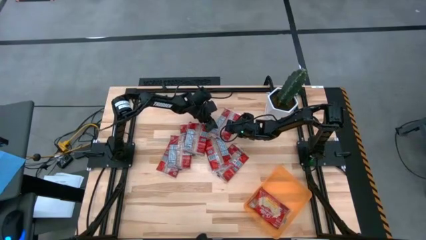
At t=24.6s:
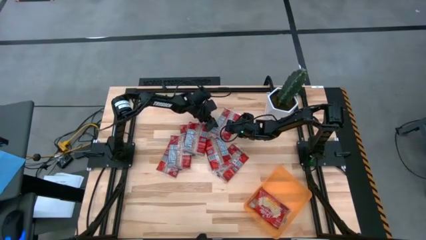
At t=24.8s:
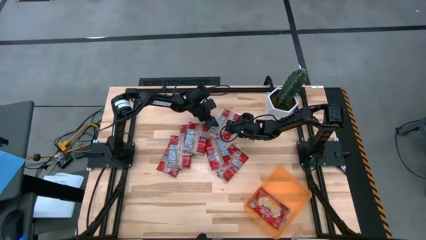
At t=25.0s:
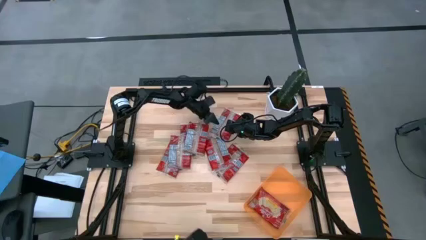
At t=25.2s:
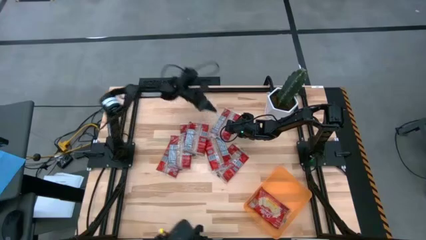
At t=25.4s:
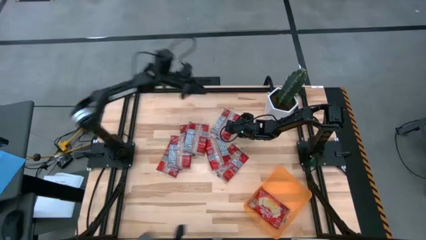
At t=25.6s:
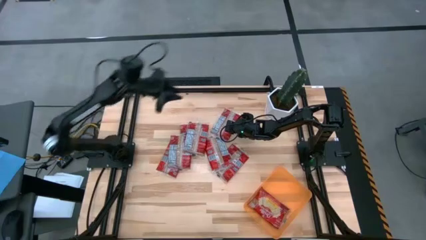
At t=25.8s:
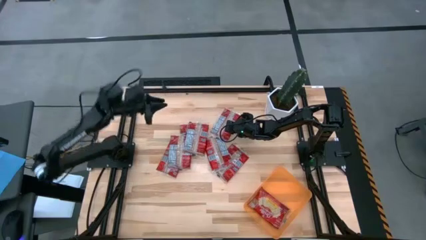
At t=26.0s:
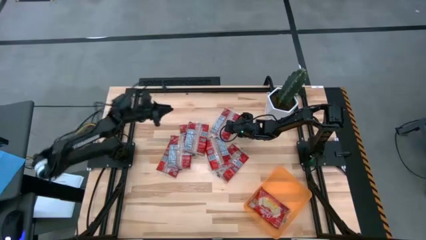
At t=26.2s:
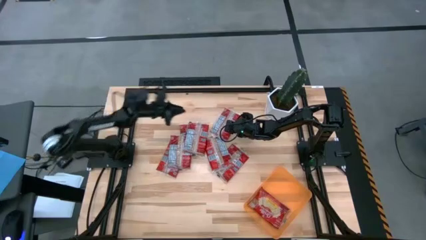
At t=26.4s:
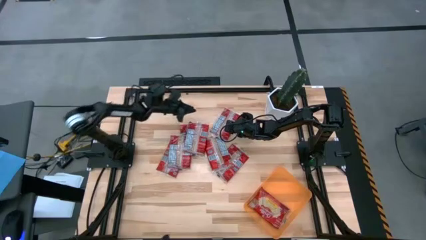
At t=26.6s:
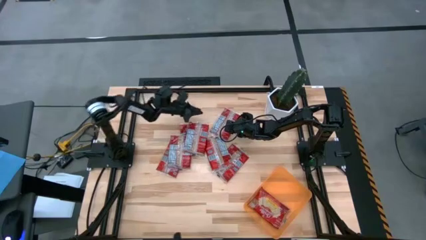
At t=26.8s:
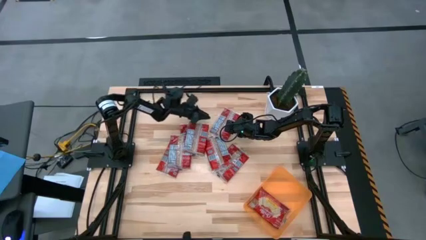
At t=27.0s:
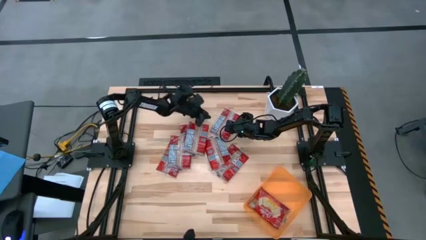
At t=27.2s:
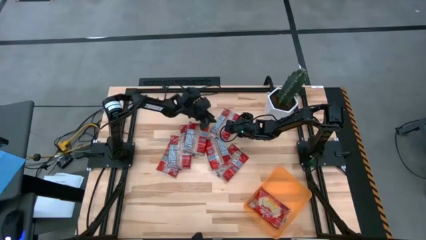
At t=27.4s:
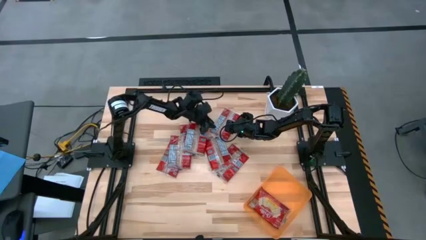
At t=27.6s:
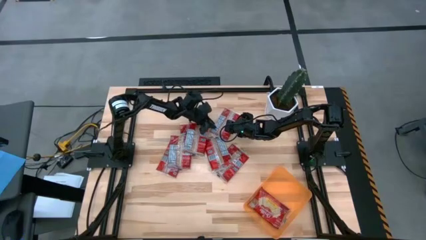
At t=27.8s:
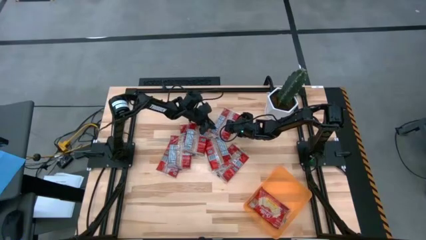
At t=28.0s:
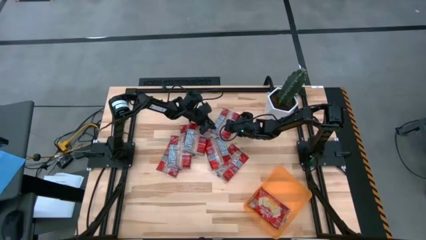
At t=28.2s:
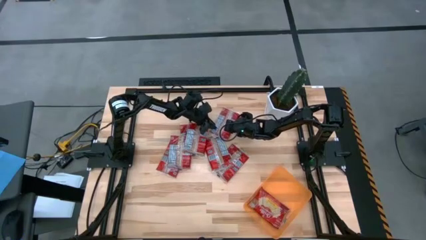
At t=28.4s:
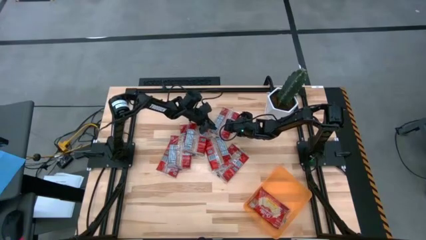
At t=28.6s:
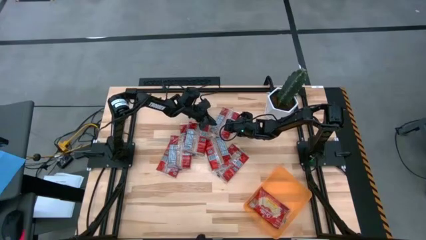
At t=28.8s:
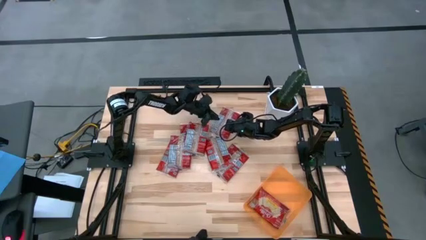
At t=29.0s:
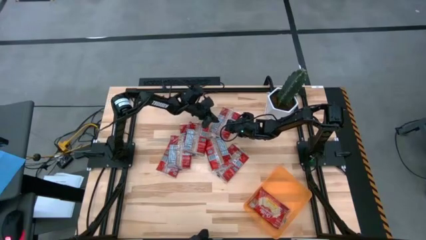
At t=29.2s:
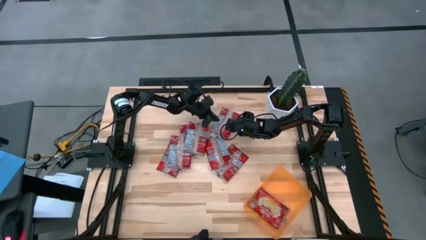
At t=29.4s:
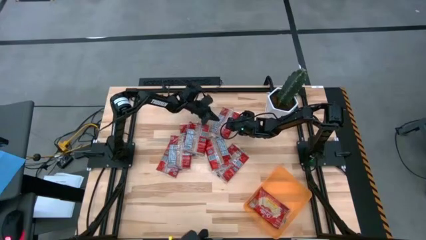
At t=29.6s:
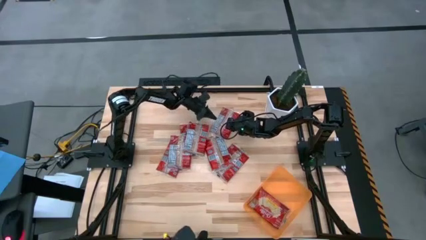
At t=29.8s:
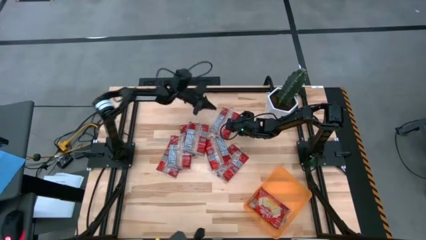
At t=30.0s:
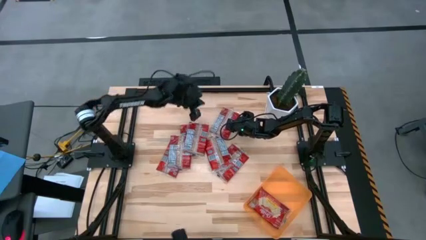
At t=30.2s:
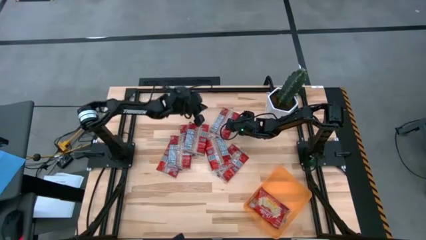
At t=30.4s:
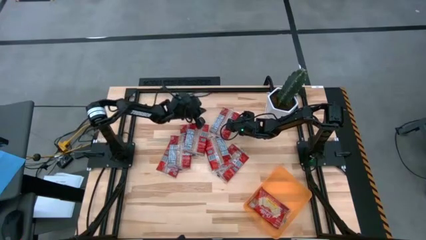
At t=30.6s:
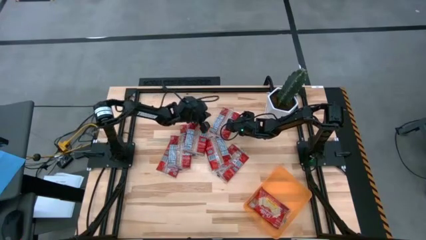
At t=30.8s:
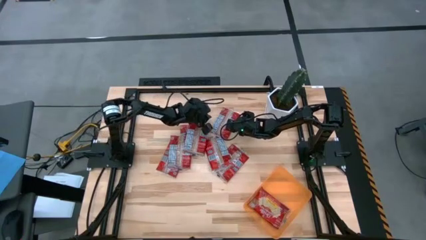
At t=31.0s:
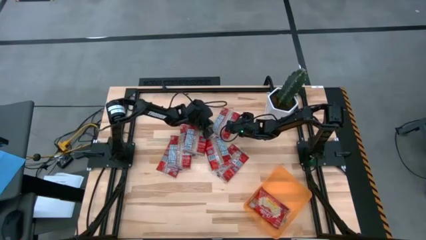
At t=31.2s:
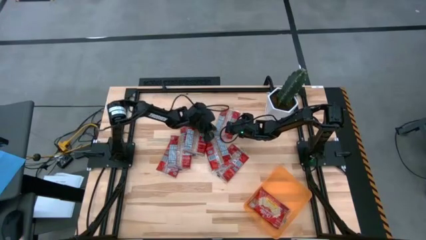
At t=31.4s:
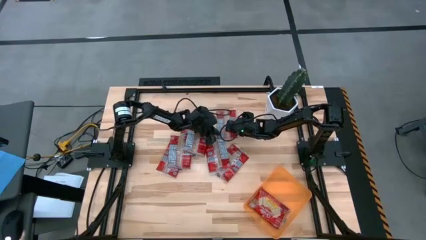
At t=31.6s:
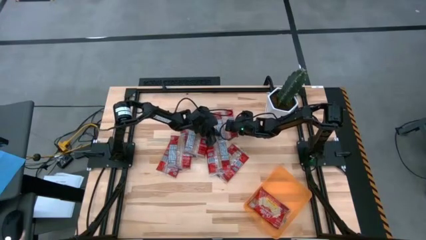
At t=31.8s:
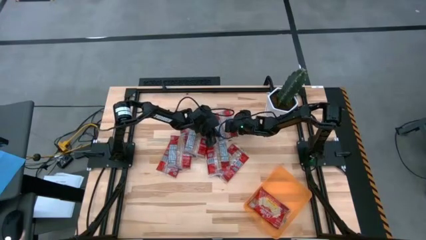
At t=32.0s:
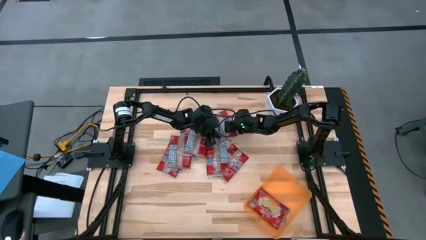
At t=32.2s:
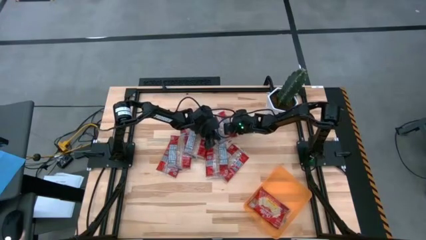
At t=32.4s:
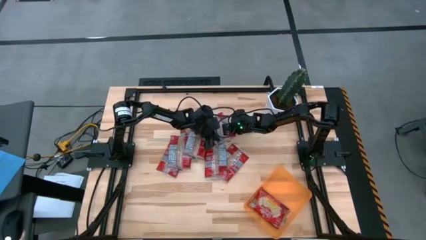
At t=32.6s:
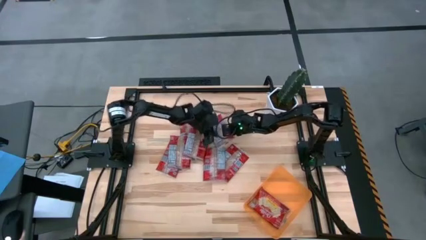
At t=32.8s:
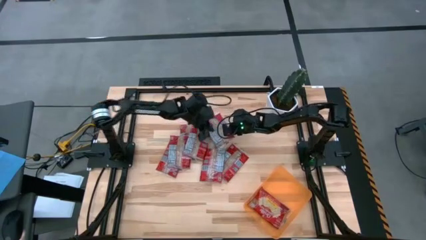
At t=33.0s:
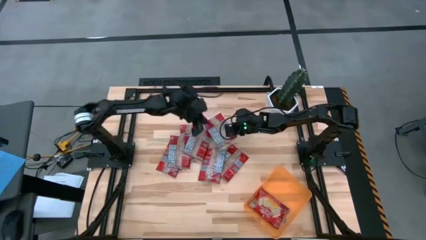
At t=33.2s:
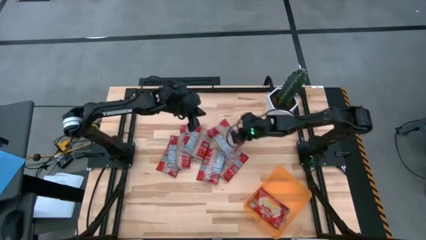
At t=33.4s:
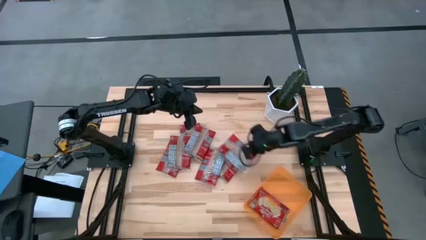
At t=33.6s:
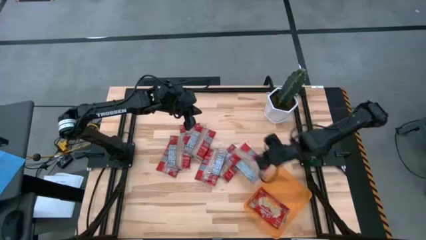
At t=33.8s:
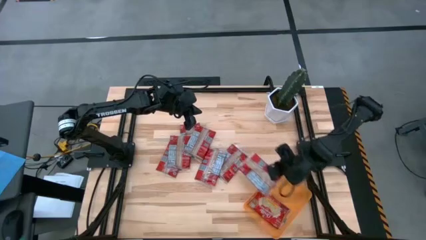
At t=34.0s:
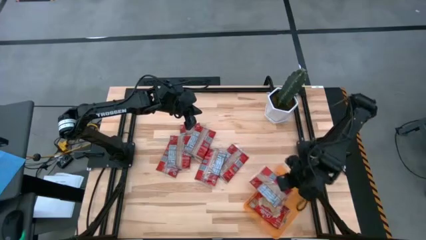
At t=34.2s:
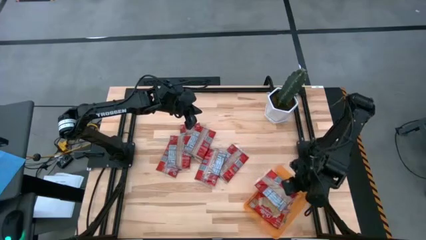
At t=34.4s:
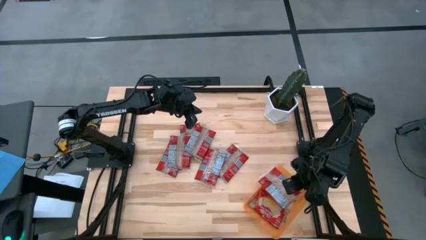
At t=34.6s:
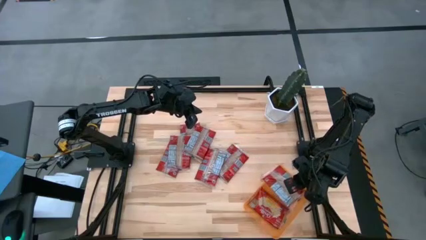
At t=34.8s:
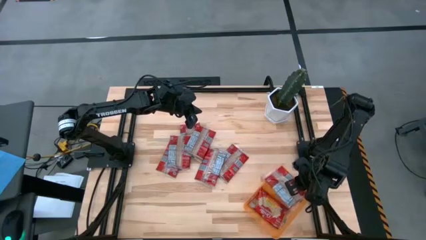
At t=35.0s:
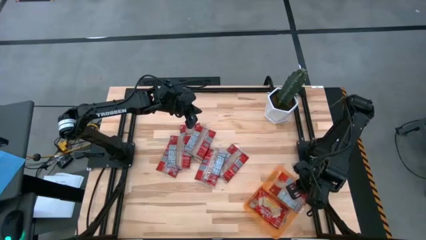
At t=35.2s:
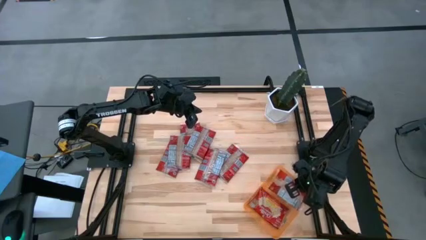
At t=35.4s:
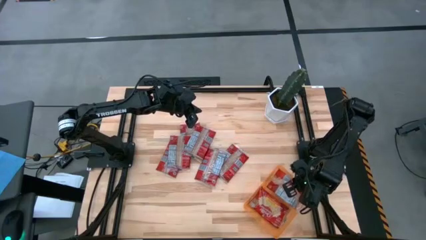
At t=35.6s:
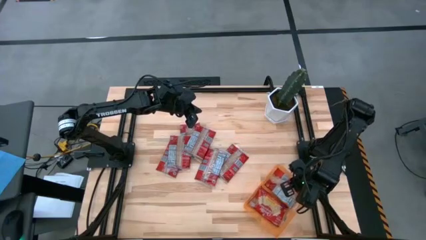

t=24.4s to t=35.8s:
Task: Sort popcorn bags into baskets
Put the red popcorn bag into the orange bin

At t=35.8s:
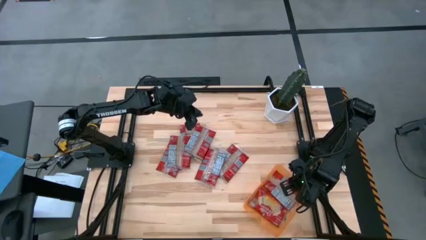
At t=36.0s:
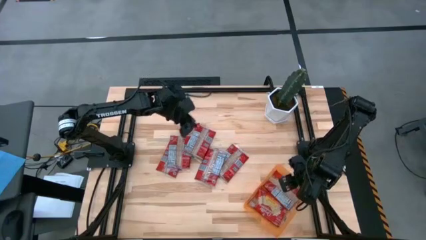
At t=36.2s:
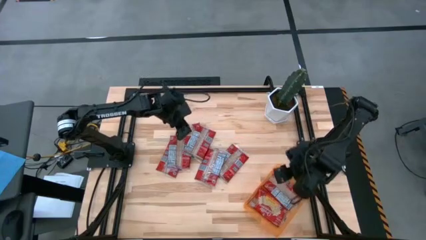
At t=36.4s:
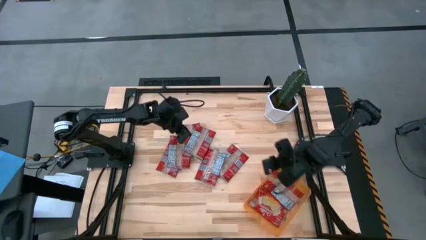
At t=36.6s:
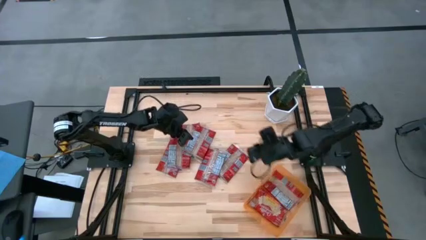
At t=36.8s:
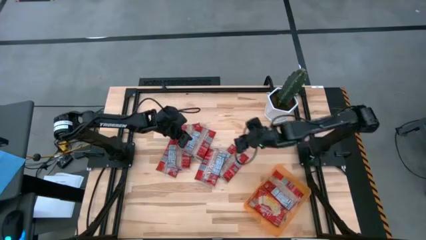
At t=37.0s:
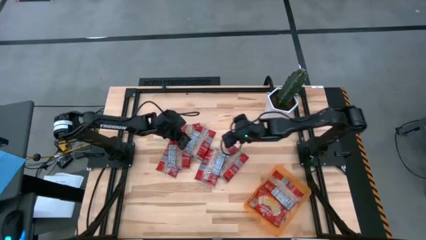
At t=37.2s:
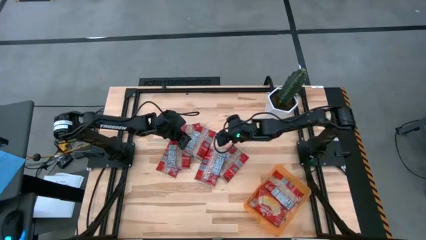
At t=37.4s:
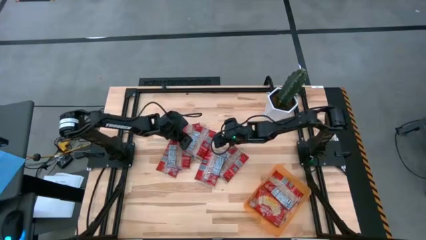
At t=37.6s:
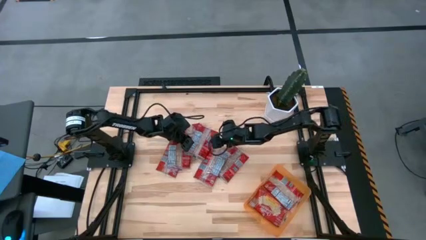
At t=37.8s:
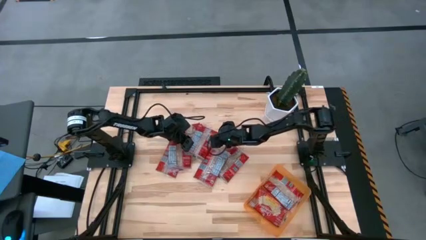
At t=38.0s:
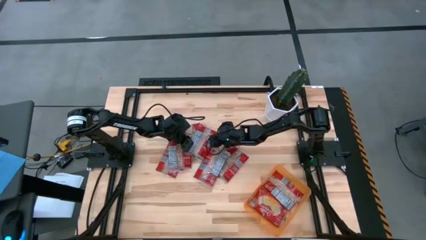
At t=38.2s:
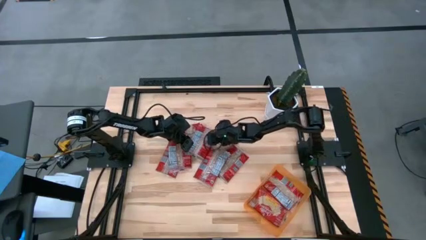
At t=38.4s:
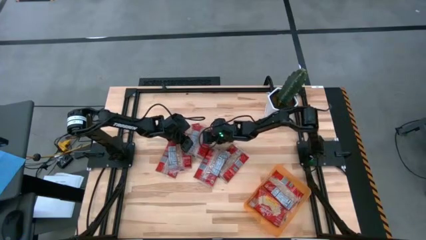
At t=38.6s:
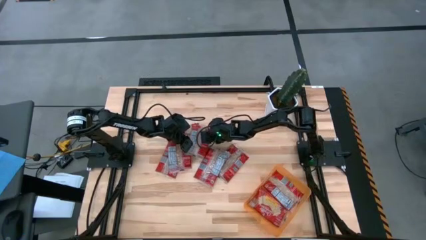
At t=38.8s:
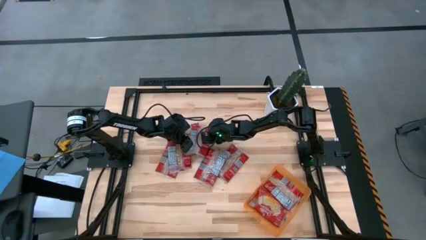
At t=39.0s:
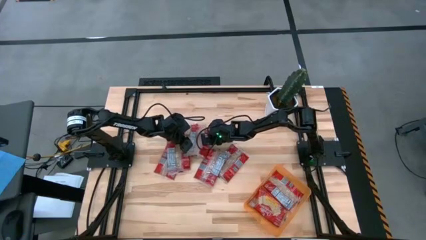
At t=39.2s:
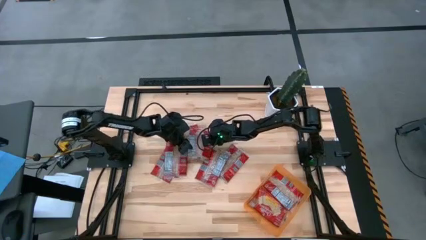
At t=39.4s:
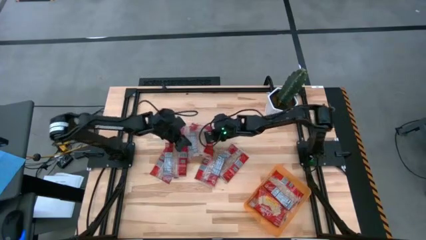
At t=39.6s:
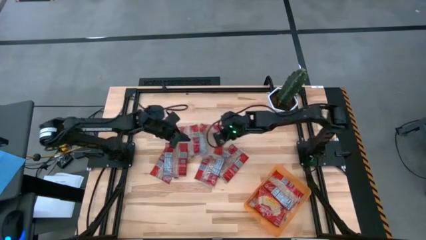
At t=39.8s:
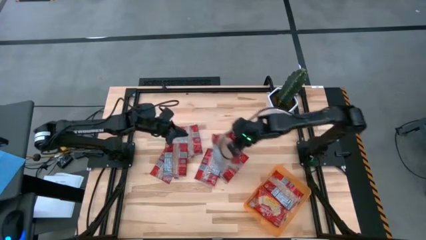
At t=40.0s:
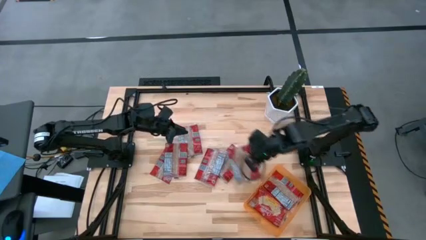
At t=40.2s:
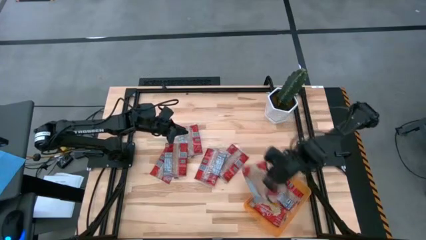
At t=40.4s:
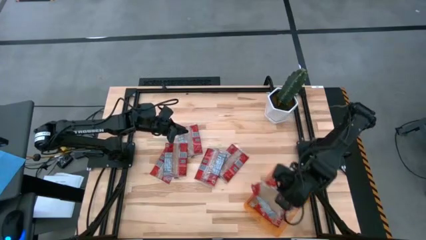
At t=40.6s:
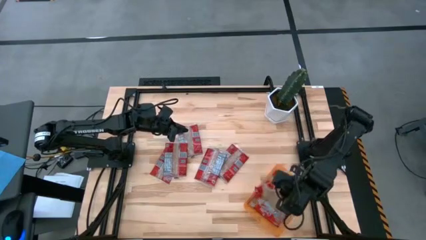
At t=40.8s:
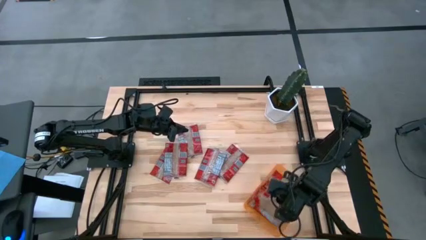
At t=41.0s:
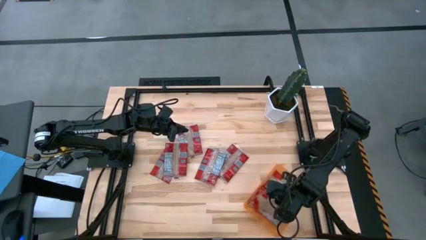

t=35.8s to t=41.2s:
Put the red popcorn bag into the orange bin
